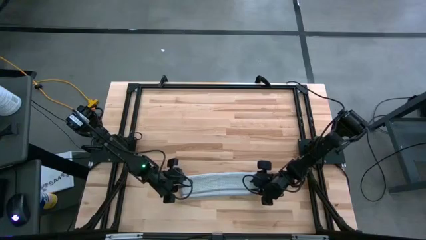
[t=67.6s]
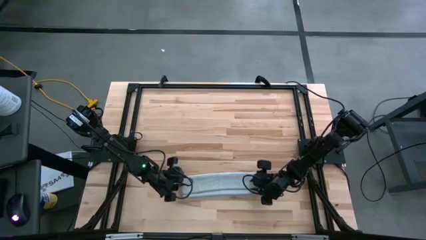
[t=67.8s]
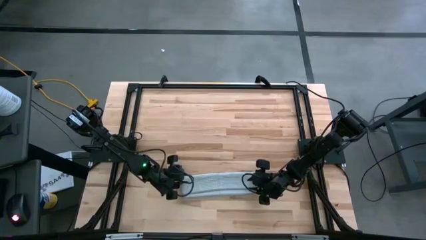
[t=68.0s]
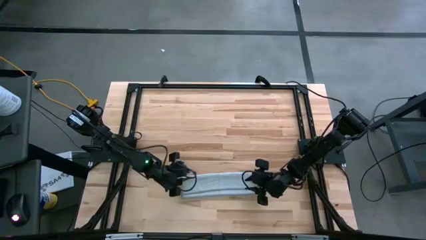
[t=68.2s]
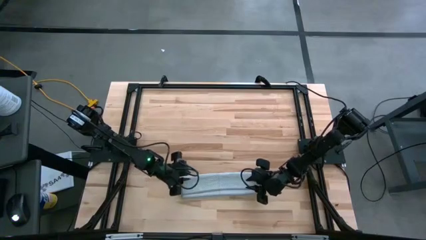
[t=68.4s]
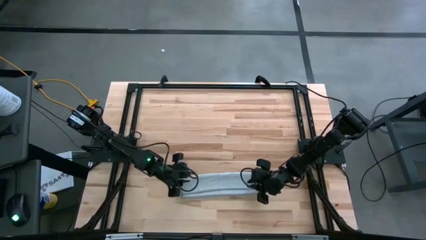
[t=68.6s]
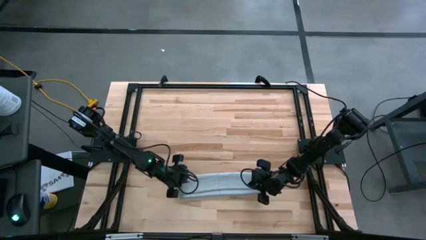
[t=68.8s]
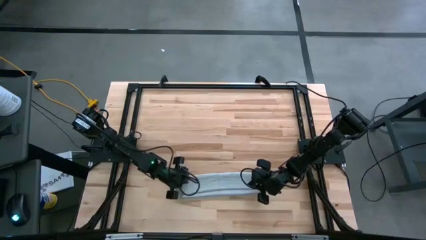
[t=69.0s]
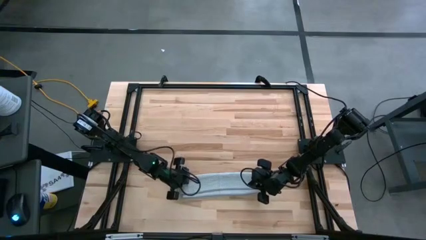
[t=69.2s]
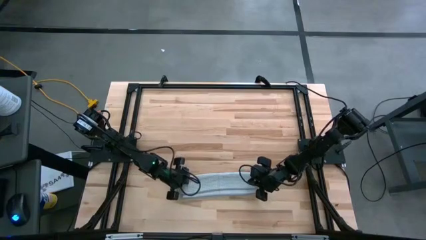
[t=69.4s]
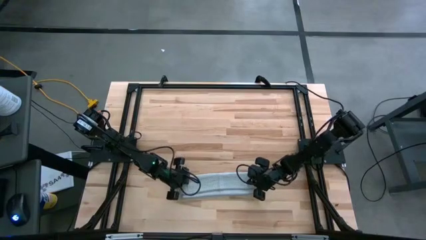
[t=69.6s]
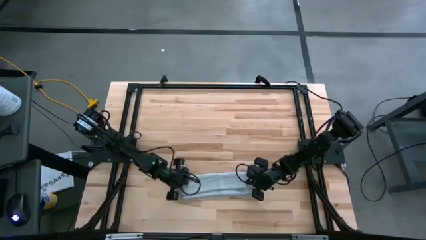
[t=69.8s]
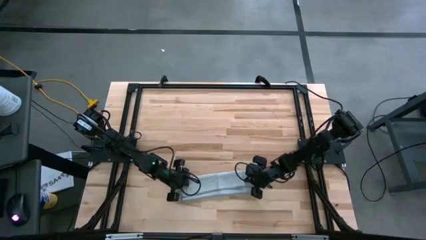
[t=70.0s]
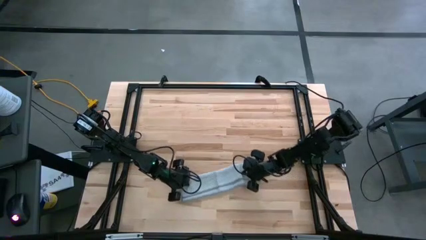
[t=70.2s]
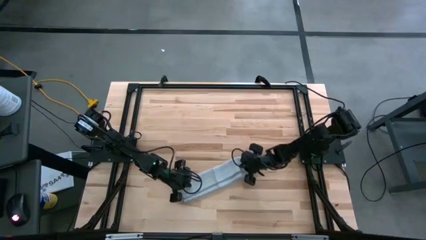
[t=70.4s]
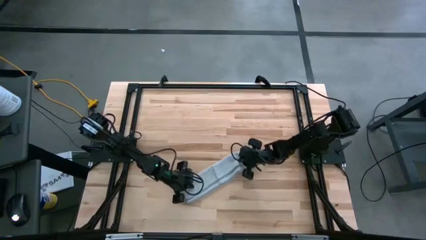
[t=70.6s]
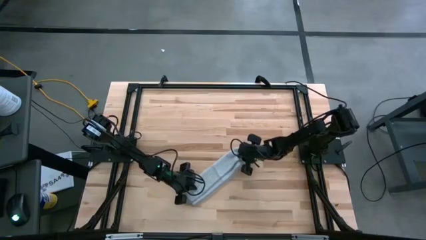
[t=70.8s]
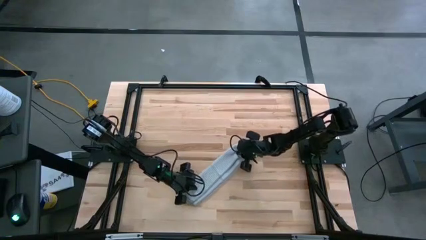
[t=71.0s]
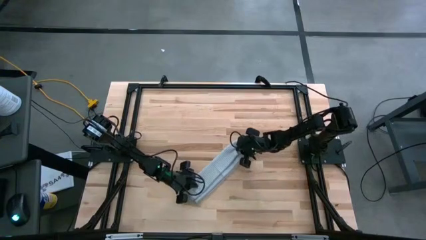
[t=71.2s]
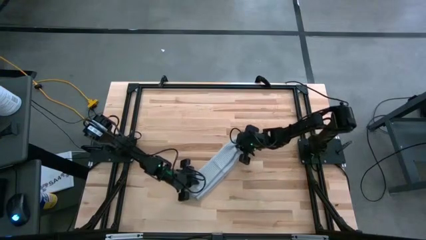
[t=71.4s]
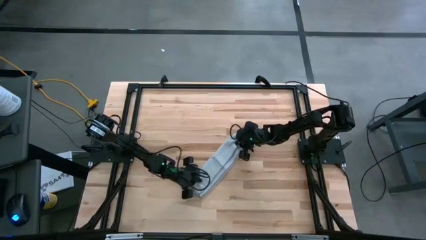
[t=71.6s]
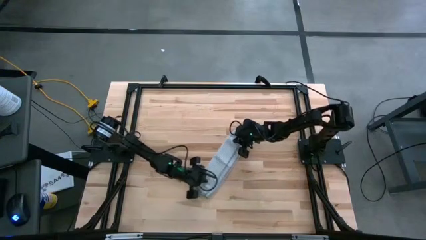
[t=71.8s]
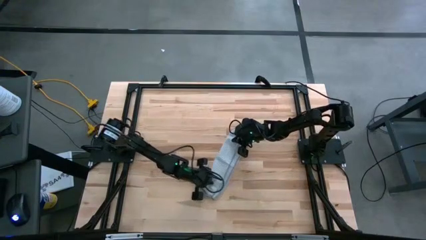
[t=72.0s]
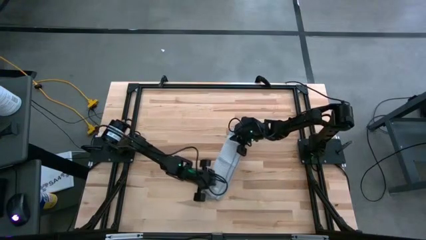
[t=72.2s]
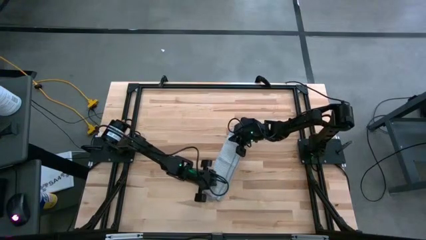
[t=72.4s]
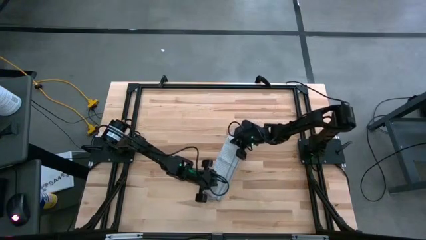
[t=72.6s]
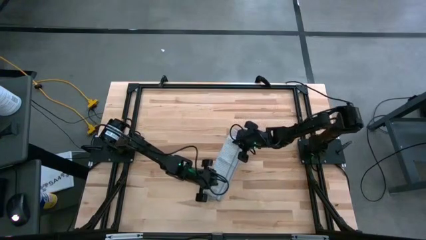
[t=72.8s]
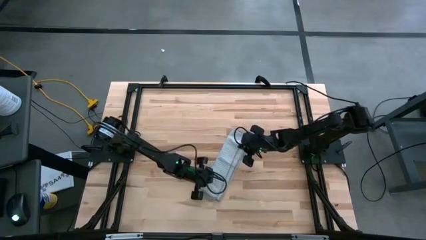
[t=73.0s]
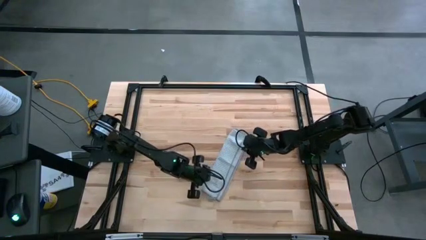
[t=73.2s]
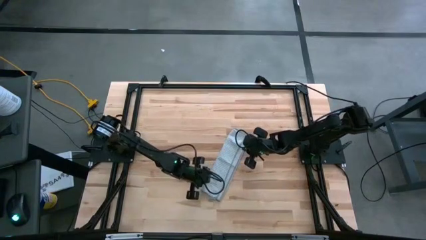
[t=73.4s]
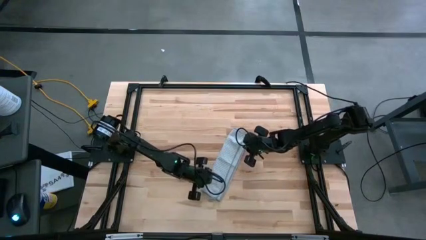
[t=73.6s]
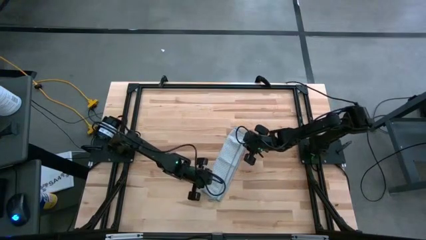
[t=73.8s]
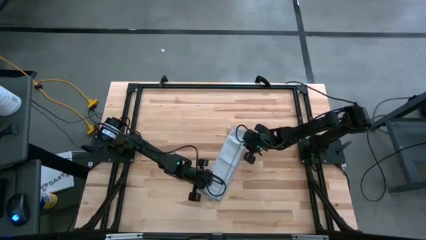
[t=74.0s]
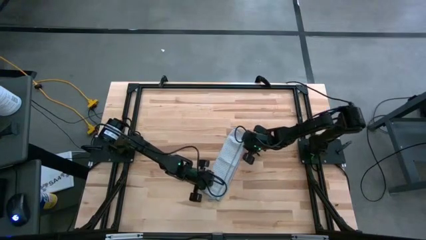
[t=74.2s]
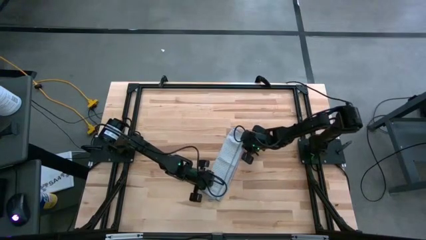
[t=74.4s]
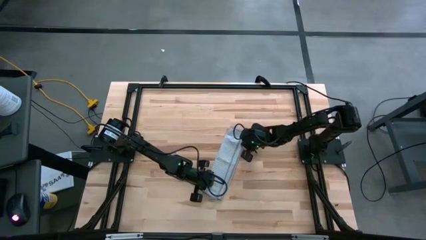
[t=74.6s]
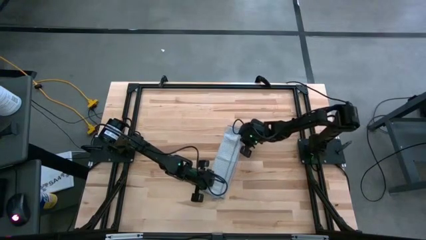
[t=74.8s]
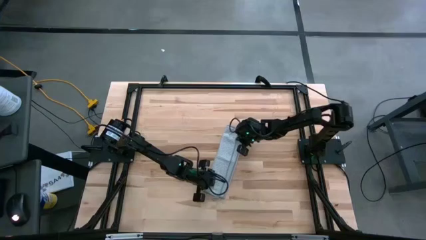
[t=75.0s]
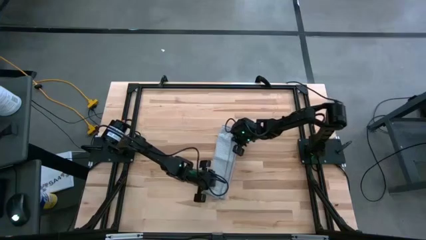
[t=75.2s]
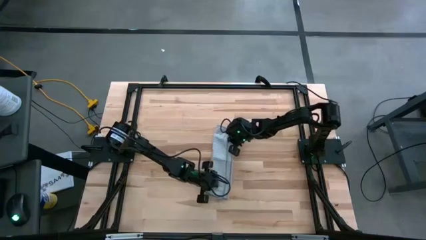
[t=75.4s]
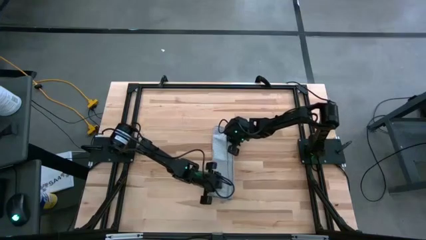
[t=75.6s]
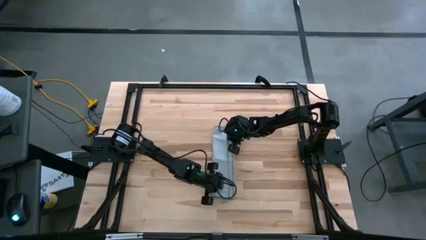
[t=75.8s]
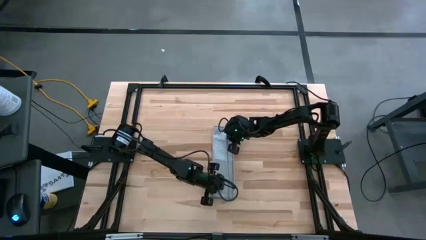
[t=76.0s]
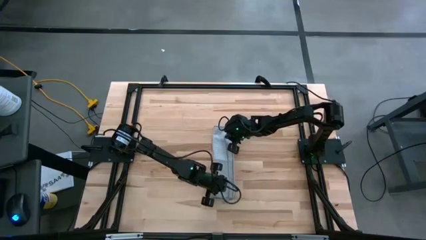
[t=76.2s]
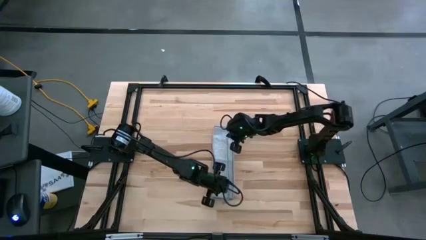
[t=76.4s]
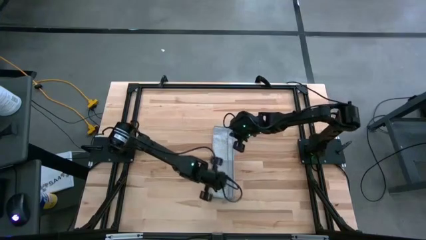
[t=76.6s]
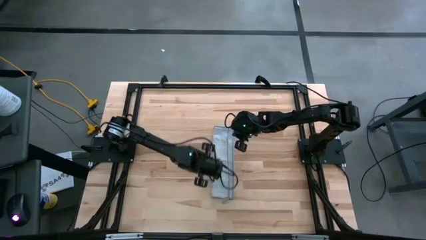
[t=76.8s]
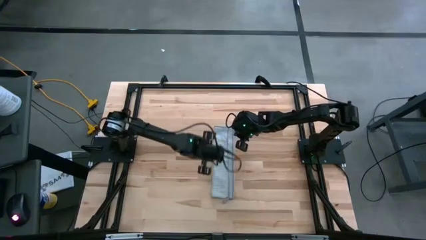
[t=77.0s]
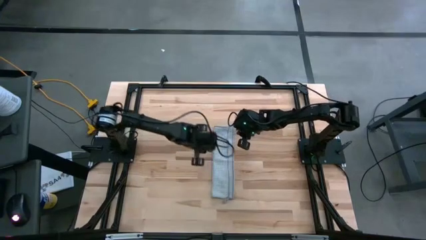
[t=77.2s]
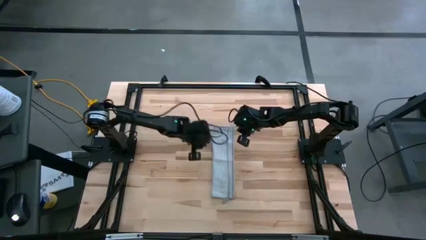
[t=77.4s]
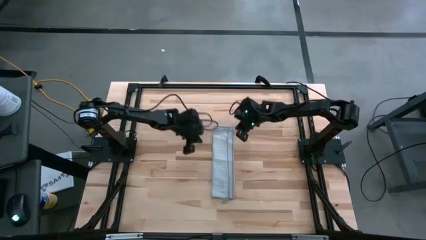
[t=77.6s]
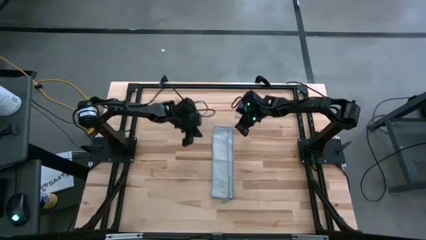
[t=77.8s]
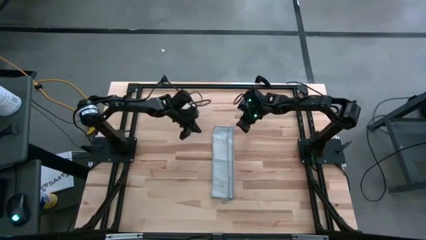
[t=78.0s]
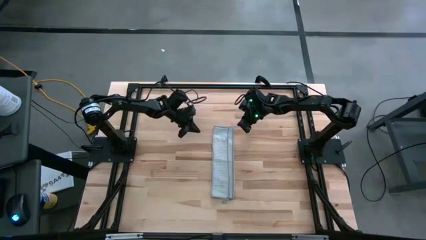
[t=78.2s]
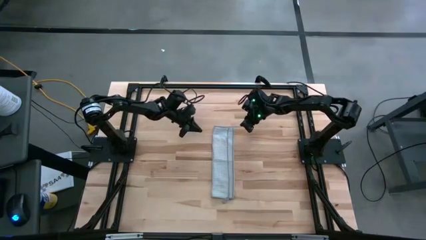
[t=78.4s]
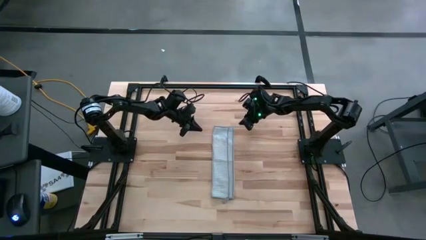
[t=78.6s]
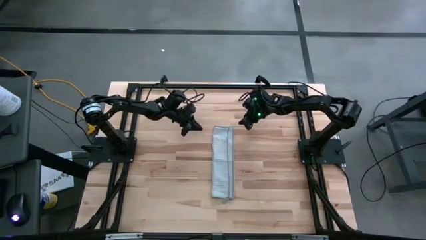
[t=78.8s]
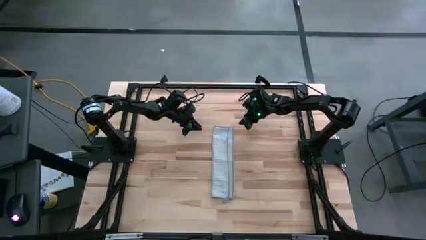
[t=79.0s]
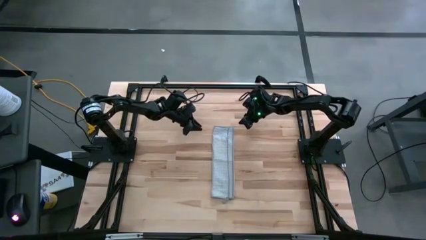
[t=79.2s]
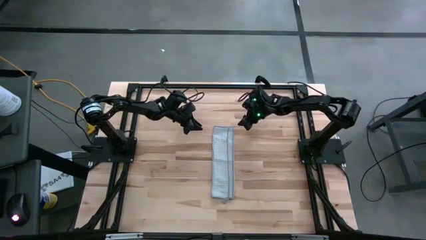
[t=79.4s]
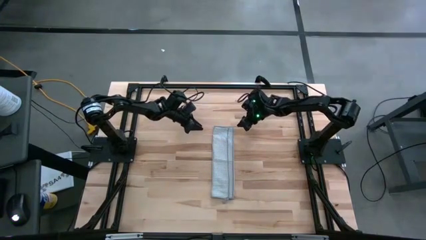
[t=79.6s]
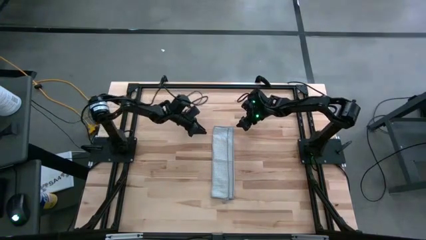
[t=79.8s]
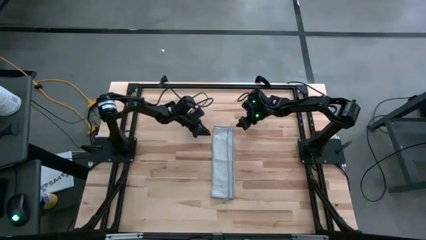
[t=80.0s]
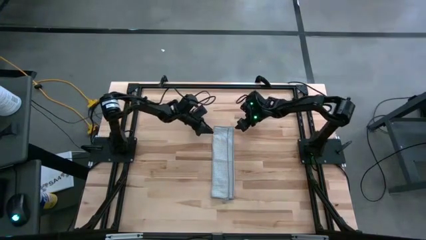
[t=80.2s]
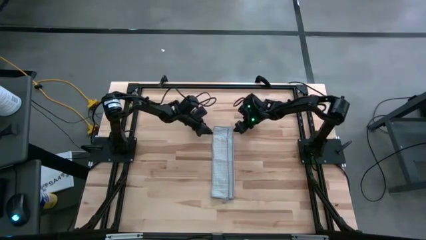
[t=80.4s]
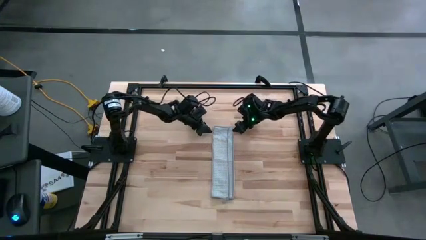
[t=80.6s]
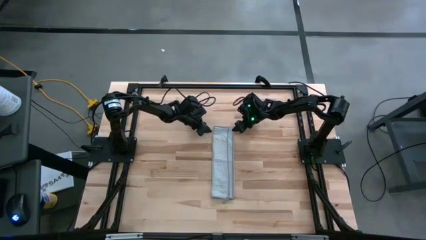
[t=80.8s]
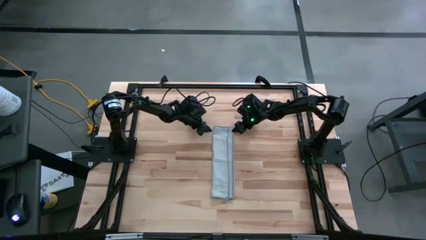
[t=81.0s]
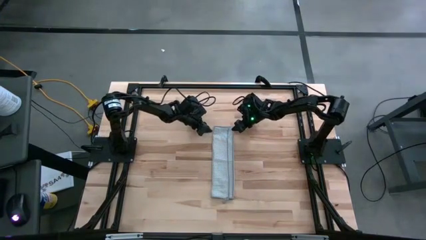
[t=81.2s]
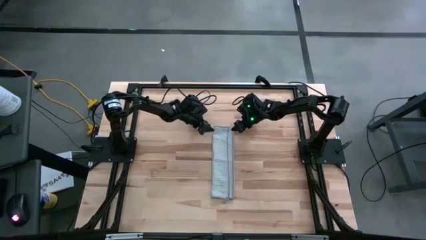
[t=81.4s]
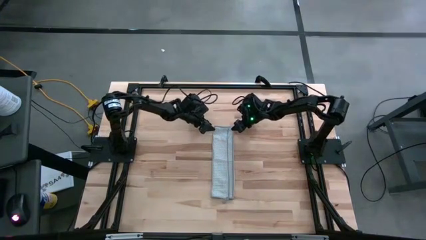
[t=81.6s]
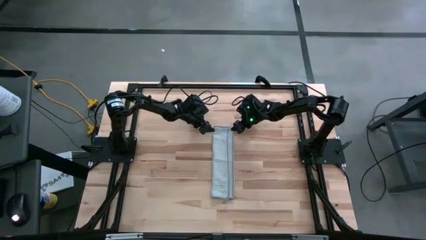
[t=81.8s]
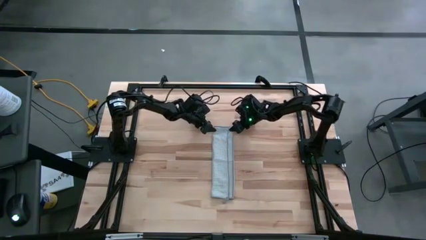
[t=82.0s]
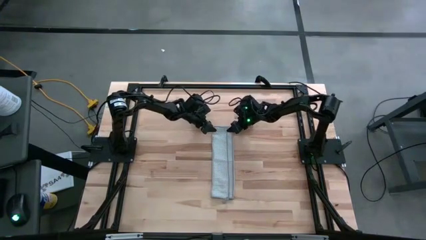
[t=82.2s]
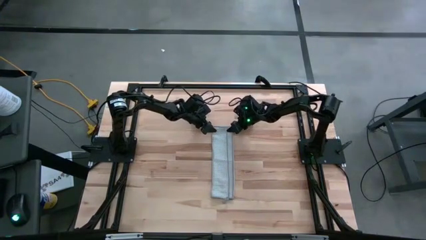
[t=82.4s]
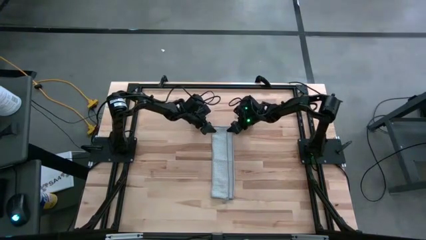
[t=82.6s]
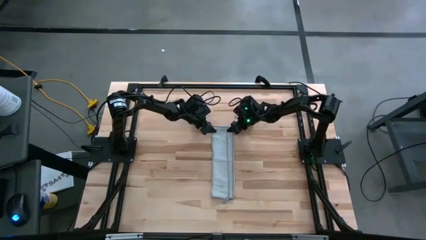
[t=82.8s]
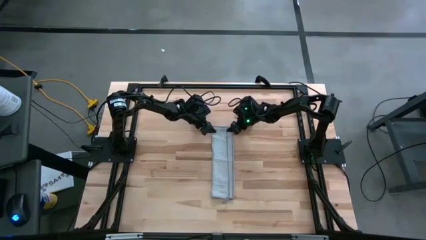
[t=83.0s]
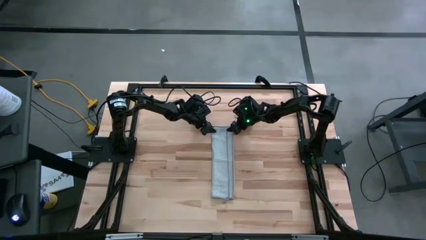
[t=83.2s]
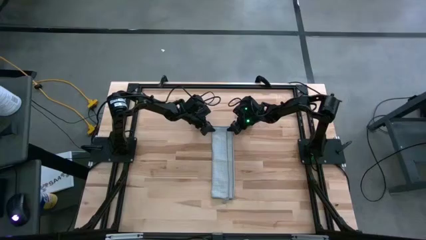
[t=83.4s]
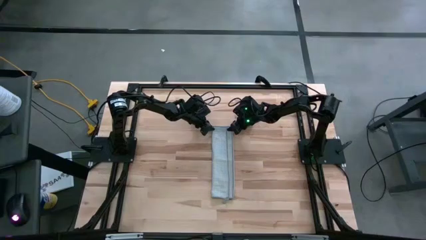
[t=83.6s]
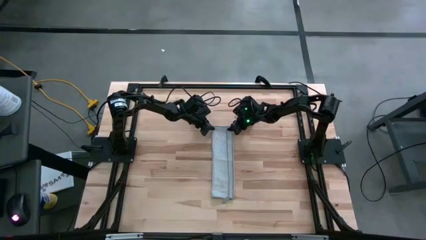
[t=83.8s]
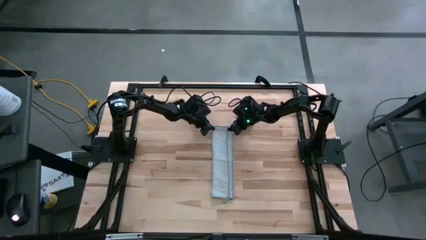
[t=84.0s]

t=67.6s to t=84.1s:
Task: Fold microfiber towels
Fold the gray towel
